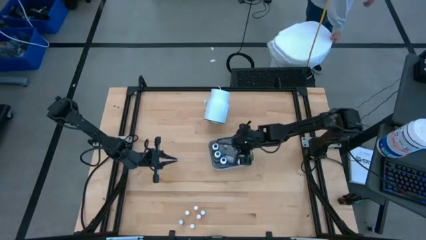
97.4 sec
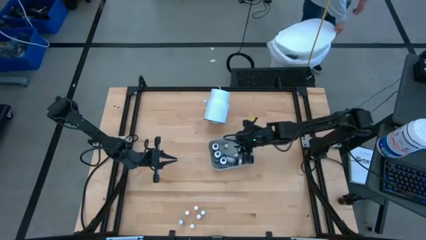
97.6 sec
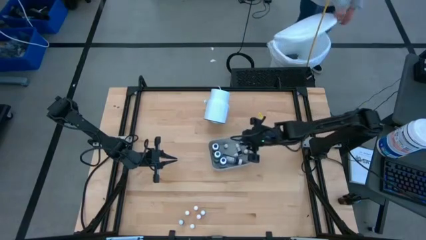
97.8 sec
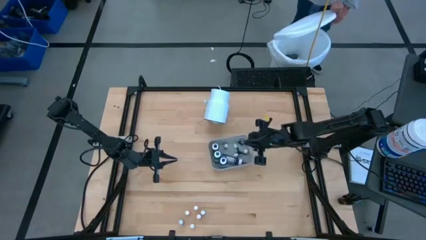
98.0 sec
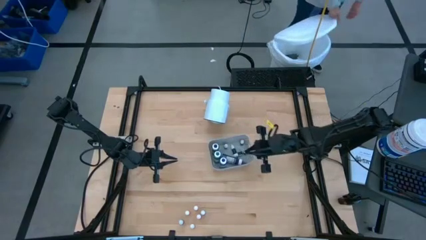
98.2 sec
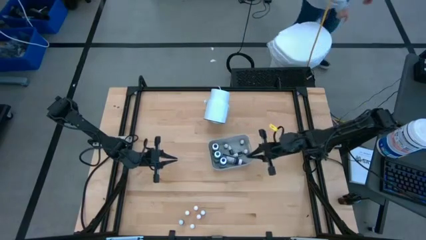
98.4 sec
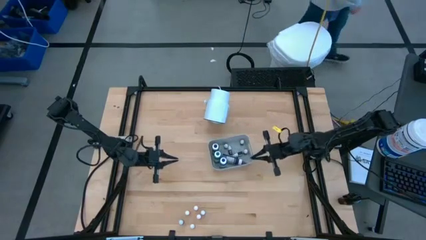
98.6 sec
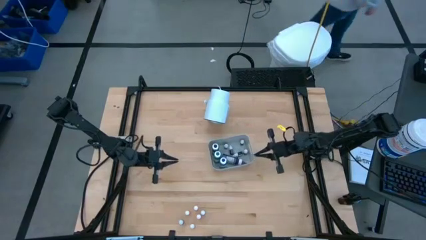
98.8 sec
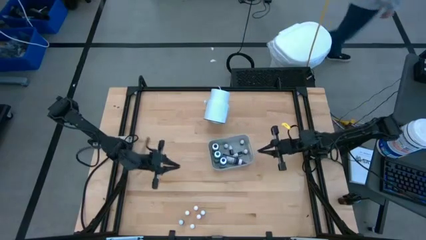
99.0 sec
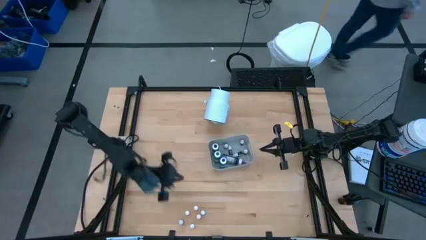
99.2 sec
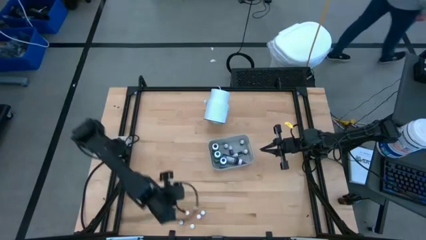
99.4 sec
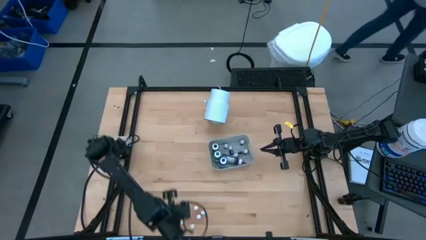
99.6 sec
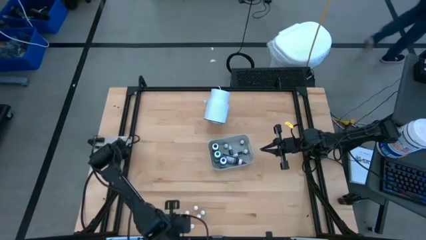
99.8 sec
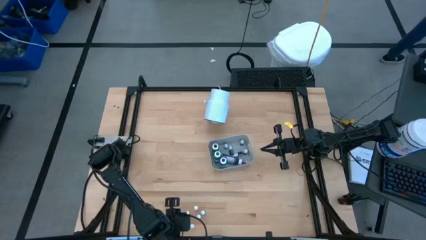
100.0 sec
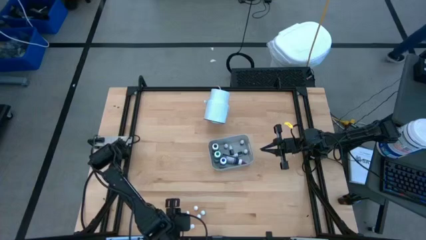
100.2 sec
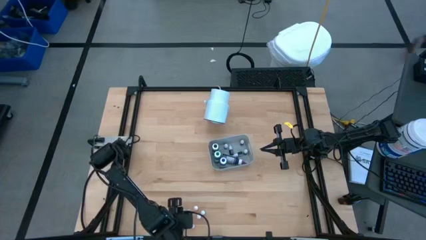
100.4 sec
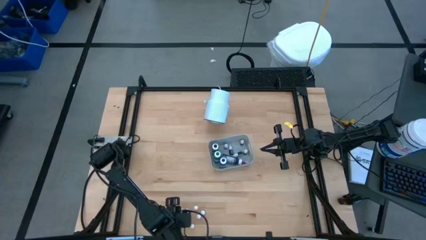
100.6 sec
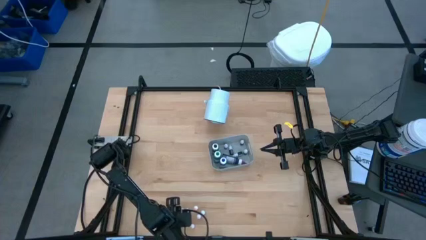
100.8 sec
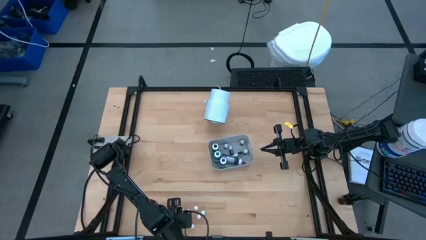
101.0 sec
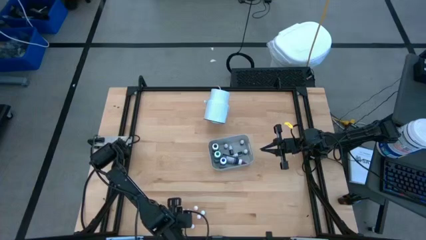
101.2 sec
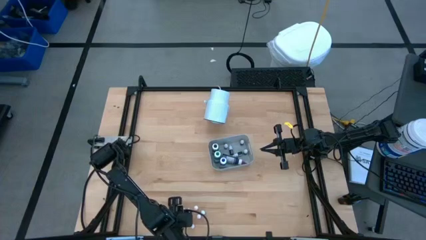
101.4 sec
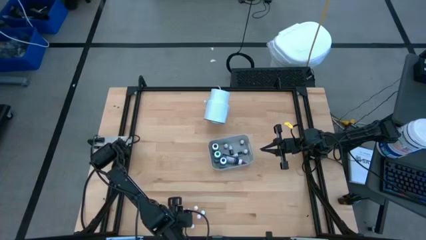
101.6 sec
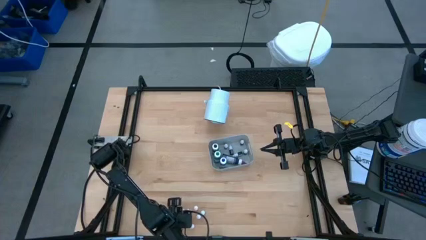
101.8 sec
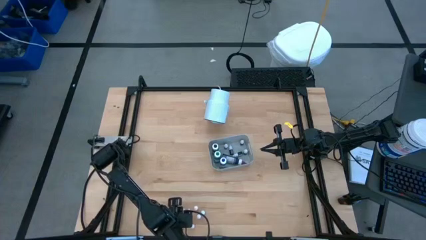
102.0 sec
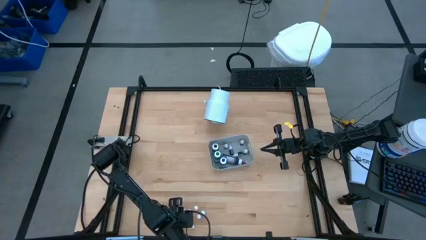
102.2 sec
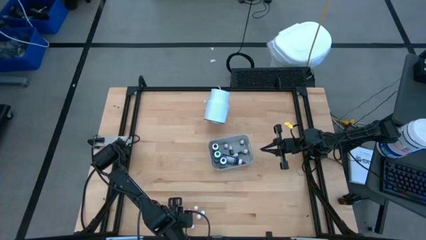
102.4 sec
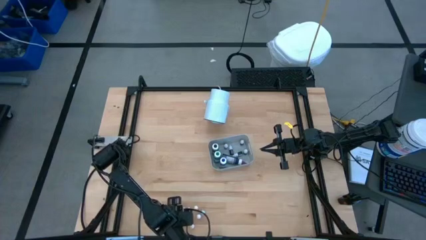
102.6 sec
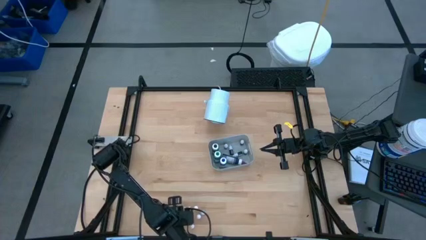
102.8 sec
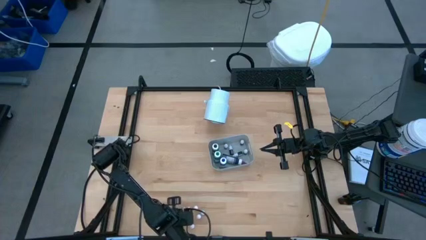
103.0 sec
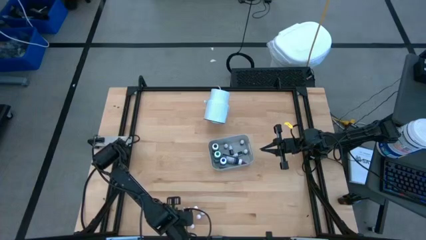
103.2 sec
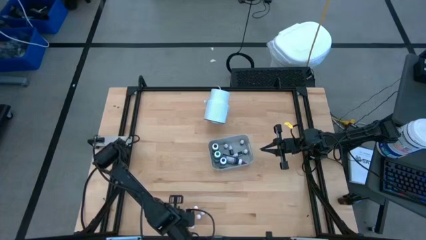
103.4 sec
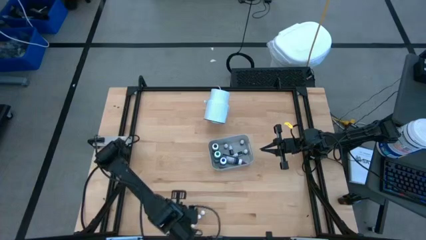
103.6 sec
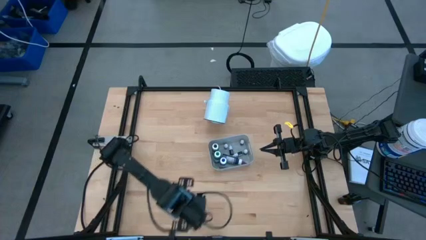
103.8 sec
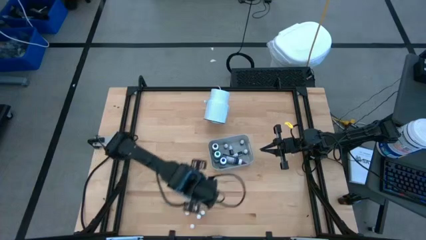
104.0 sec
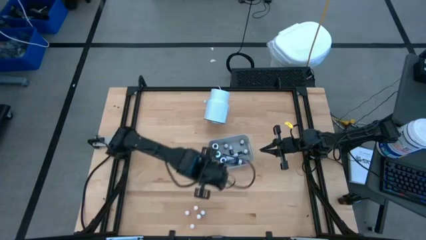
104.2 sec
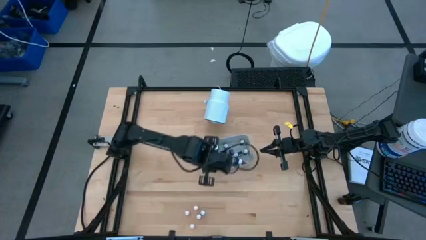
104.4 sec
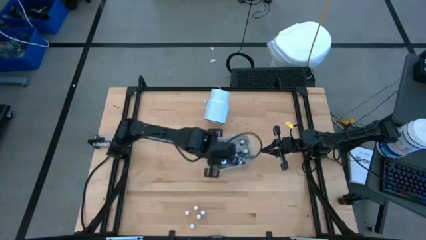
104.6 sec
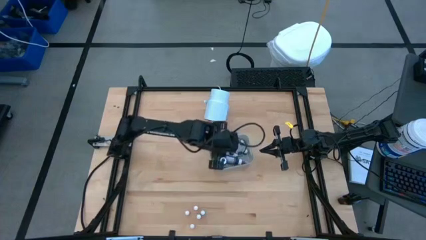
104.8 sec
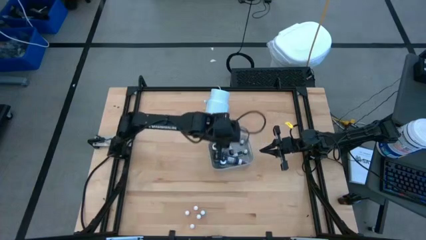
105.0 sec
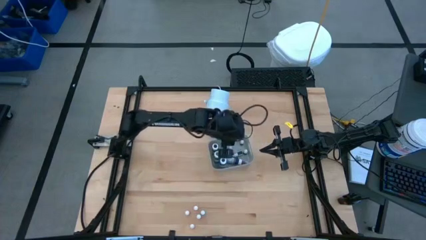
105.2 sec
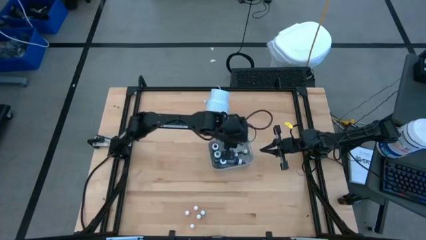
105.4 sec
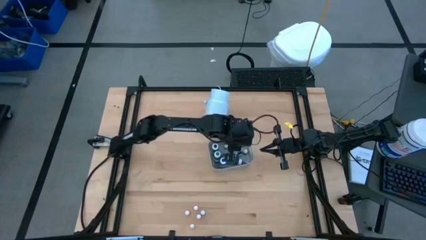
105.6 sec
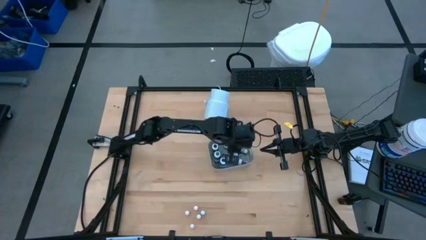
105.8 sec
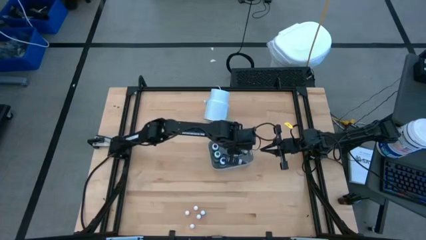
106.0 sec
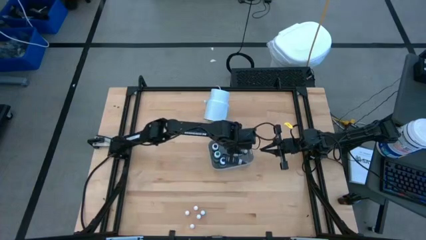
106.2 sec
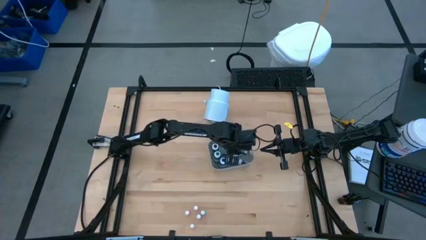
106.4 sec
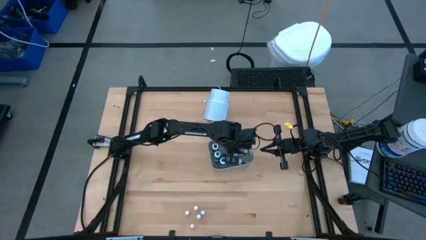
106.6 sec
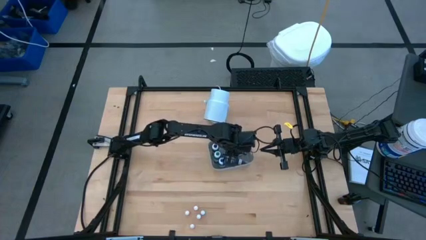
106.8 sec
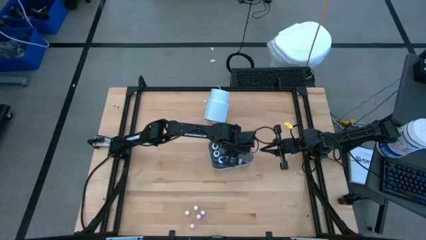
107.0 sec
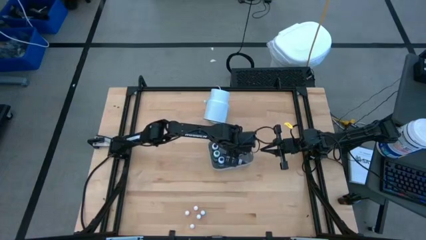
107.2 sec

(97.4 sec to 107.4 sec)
Task: Pick & Place food coloring
Put the small green food coloring bottle into the gray bin

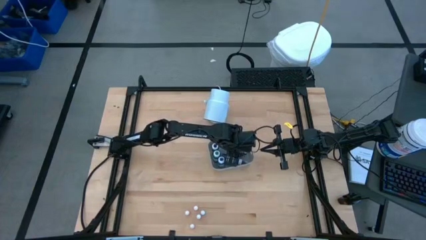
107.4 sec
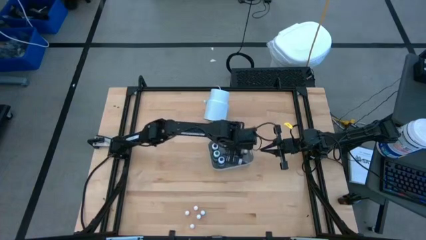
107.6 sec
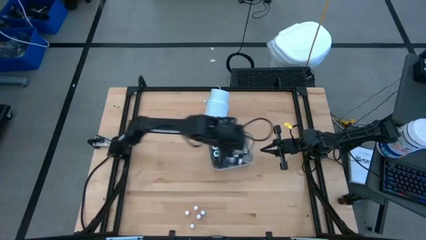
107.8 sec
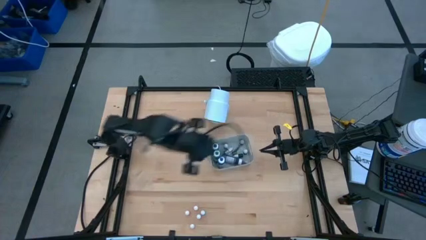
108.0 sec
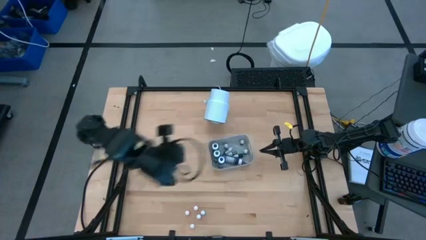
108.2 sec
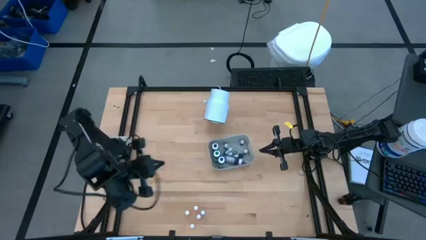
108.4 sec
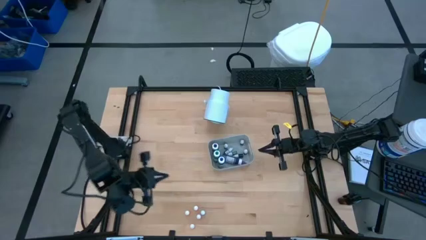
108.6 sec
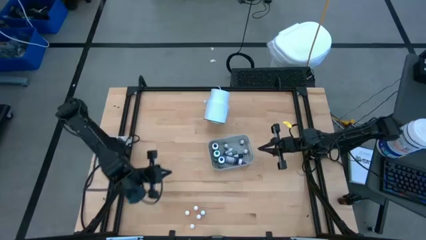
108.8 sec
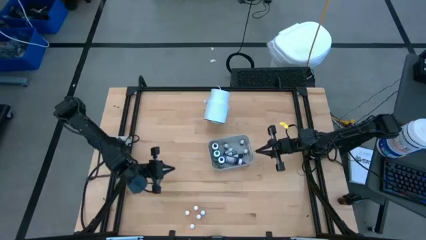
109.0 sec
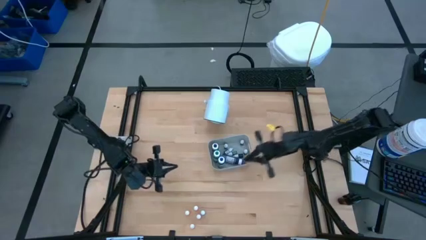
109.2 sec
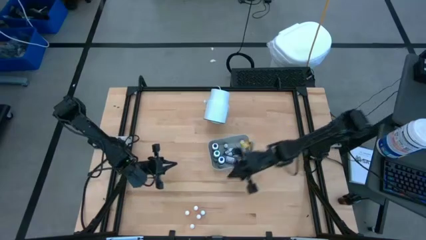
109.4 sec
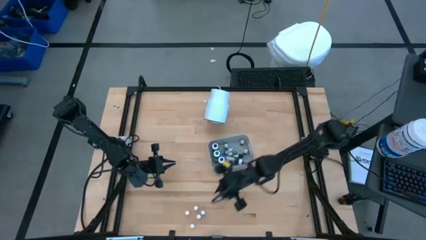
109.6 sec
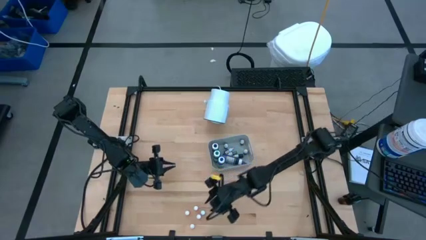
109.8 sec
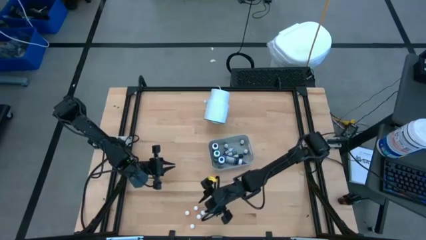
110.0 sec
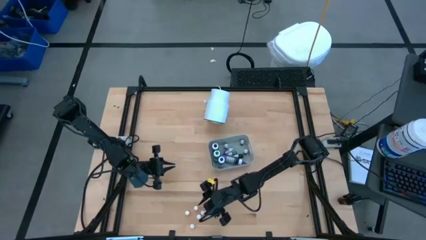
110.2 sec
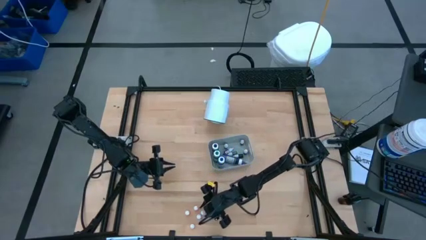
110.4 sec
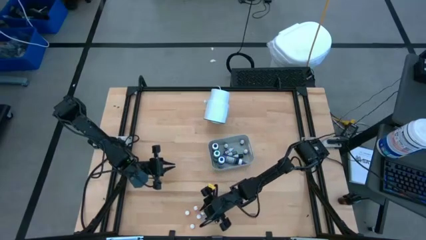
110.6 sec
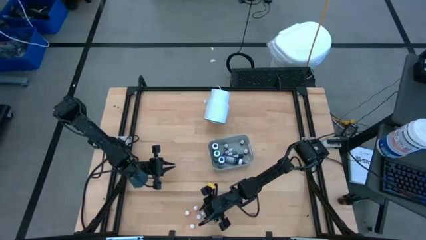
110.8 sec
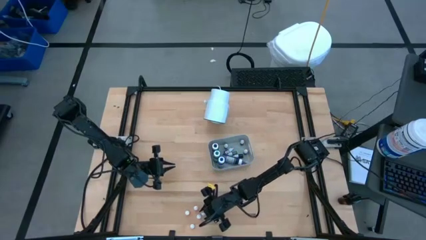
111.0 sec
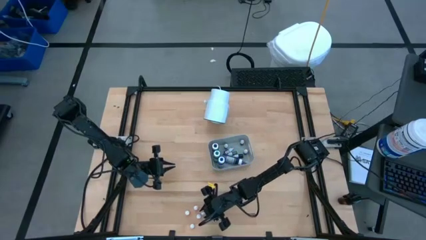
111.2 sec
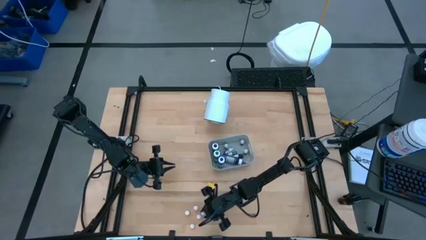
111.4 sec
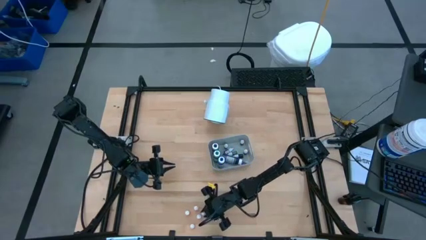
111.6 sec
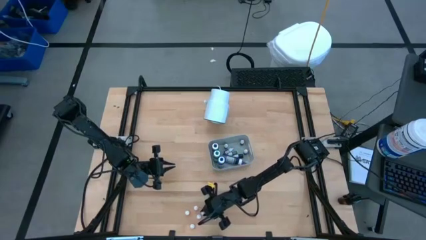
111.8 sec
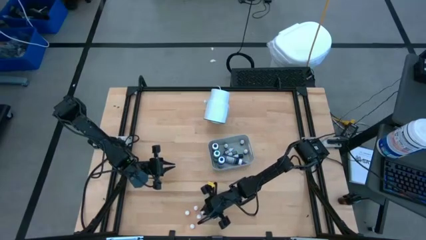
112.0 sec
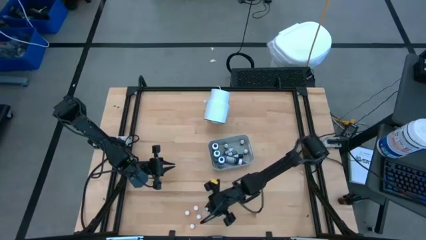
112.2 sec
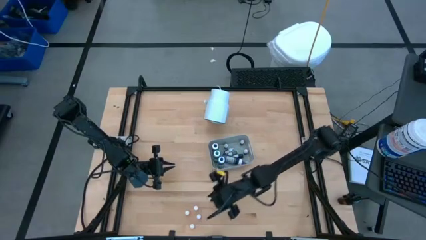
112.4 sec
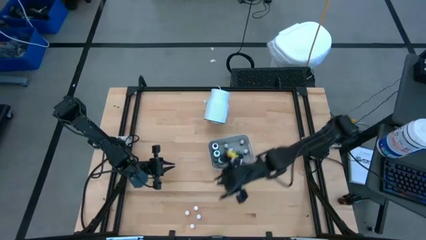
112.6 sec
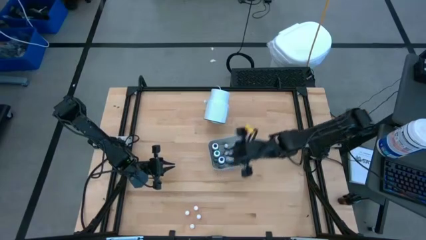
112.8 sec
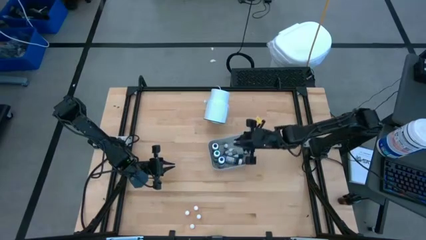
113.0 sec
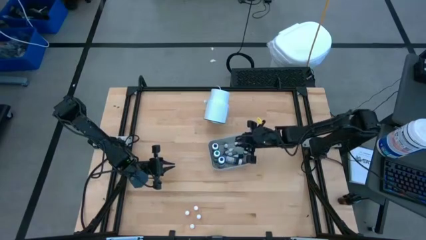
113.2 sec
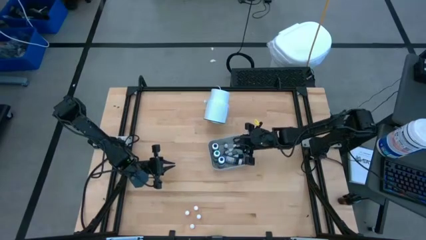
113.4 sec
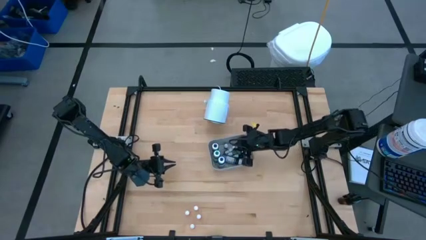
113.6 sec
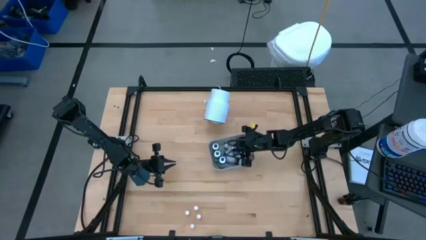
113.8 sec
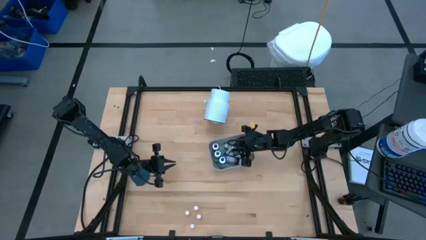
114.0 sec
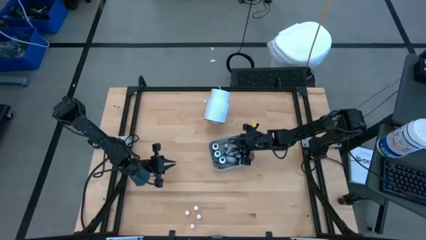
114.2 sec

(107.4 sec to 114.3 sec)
Put the small blue food coloring bottle into the gray bin
